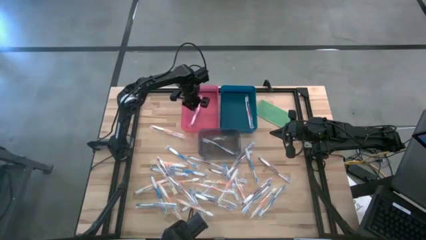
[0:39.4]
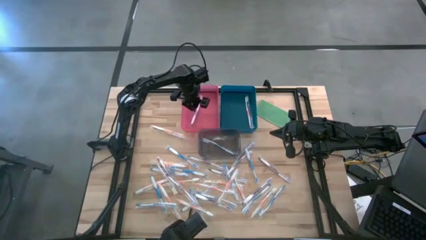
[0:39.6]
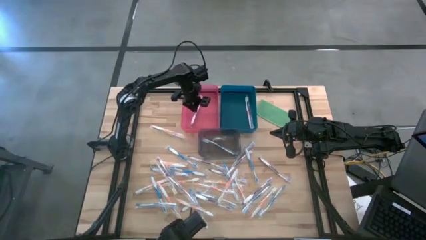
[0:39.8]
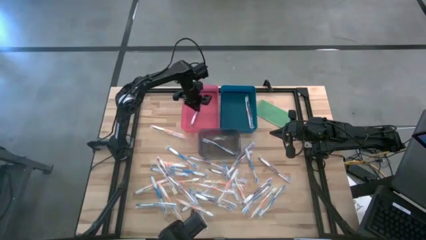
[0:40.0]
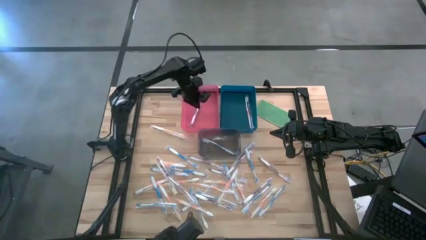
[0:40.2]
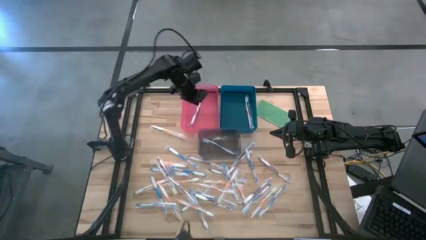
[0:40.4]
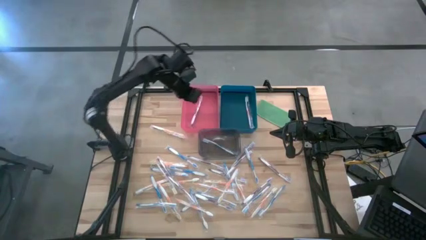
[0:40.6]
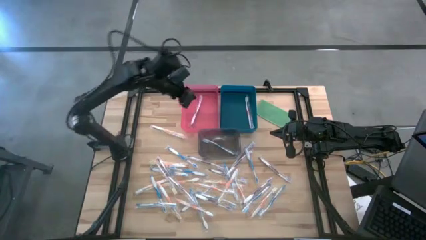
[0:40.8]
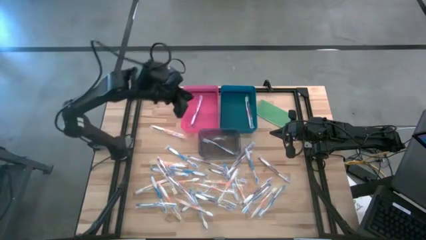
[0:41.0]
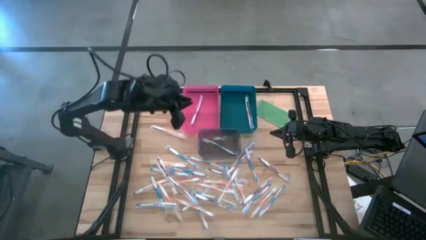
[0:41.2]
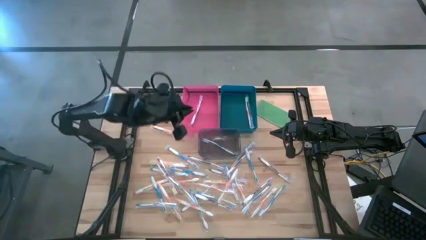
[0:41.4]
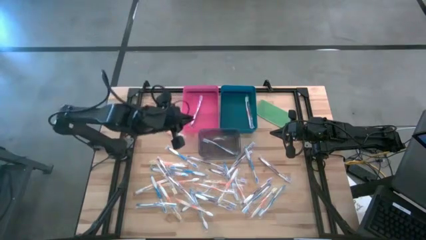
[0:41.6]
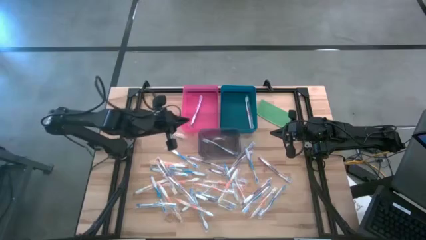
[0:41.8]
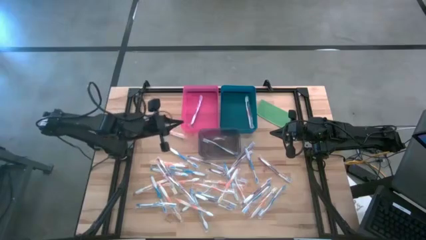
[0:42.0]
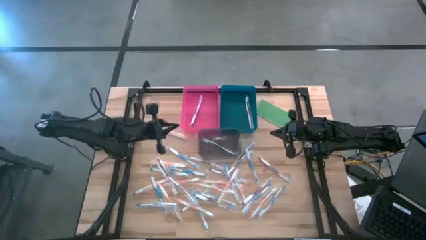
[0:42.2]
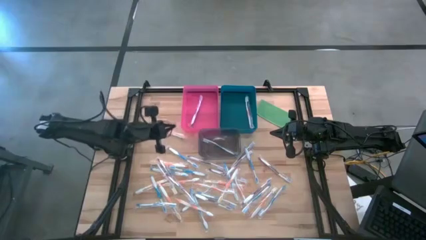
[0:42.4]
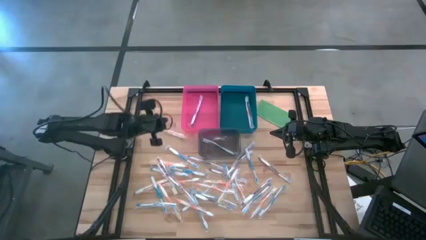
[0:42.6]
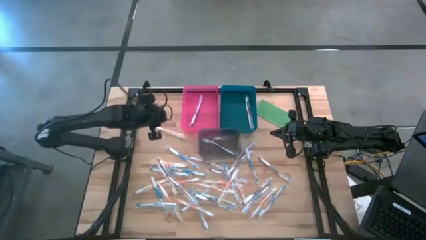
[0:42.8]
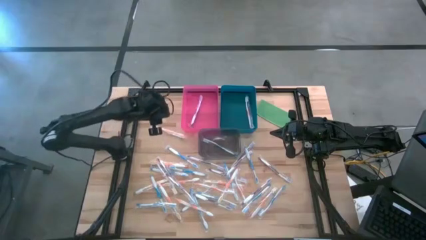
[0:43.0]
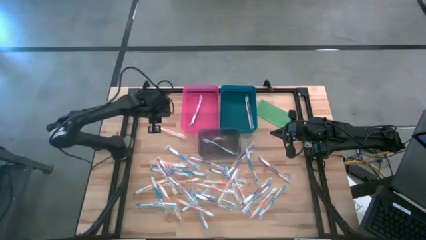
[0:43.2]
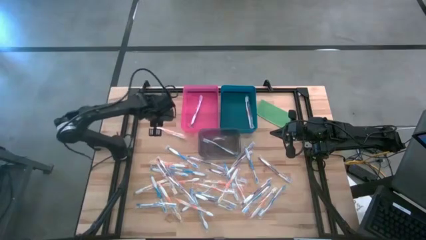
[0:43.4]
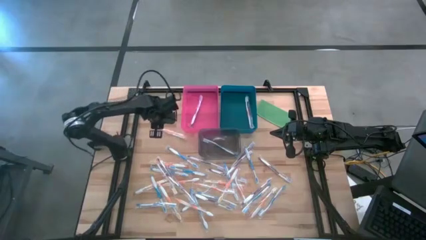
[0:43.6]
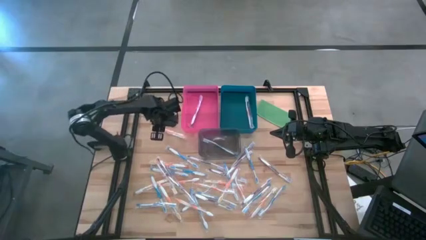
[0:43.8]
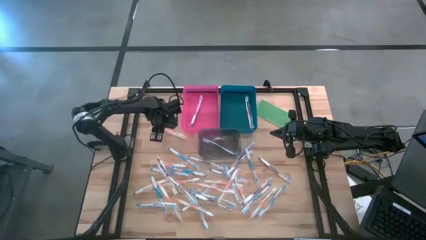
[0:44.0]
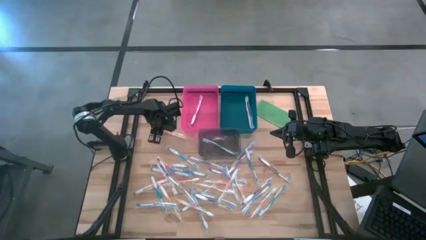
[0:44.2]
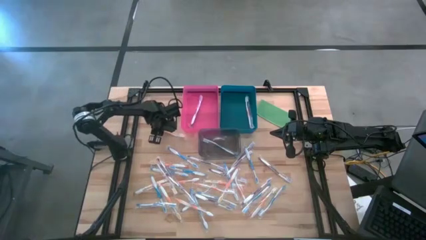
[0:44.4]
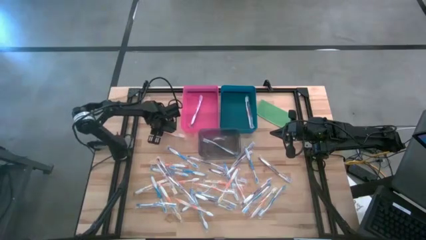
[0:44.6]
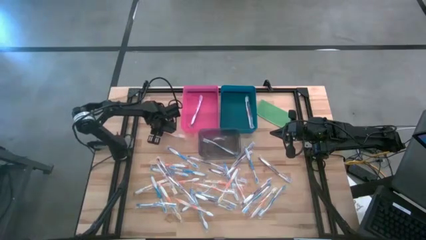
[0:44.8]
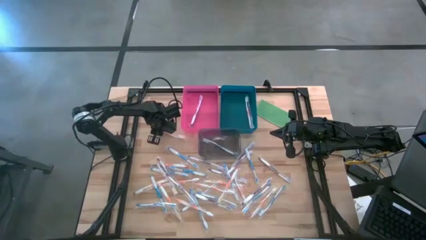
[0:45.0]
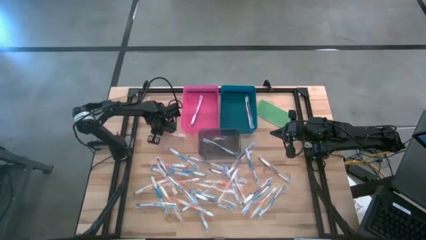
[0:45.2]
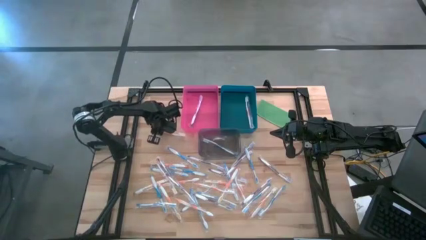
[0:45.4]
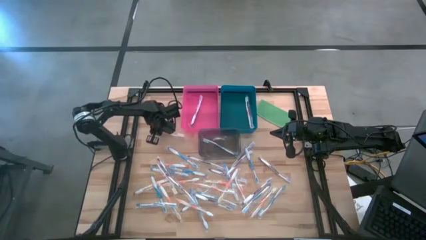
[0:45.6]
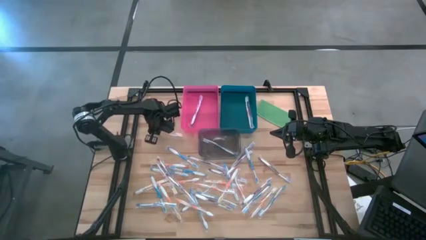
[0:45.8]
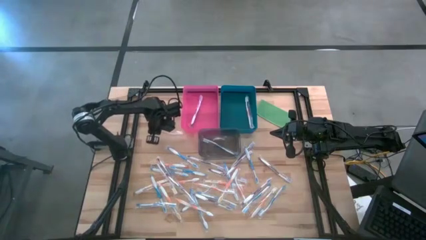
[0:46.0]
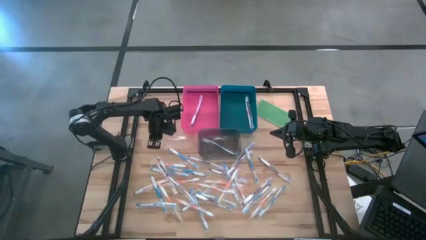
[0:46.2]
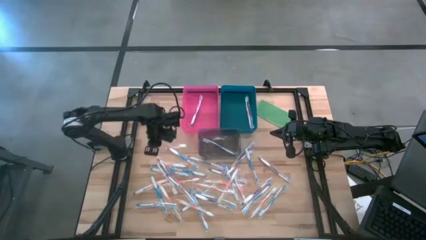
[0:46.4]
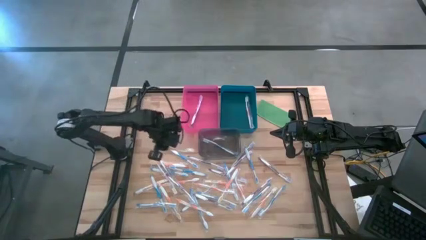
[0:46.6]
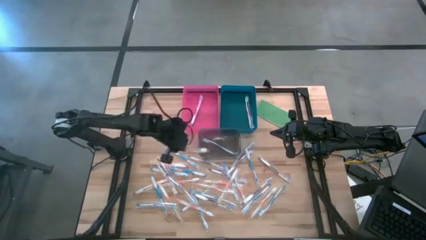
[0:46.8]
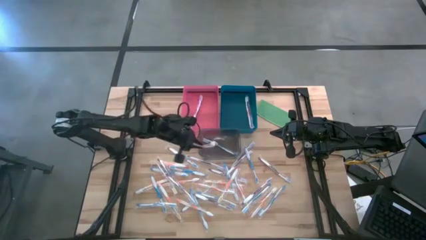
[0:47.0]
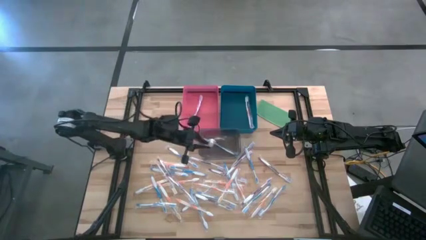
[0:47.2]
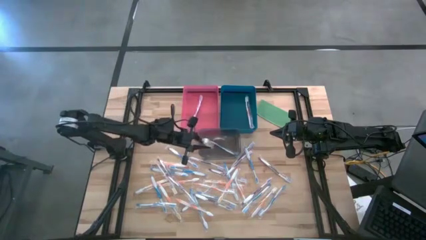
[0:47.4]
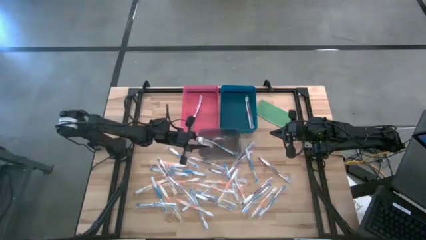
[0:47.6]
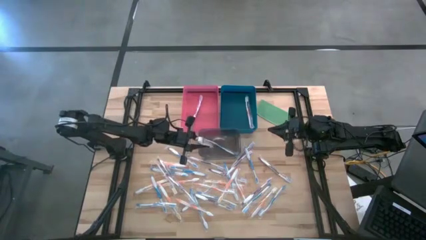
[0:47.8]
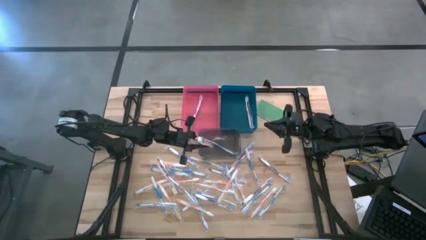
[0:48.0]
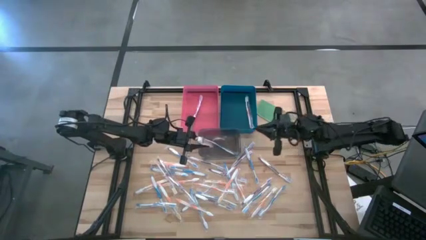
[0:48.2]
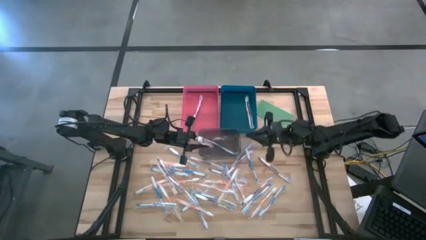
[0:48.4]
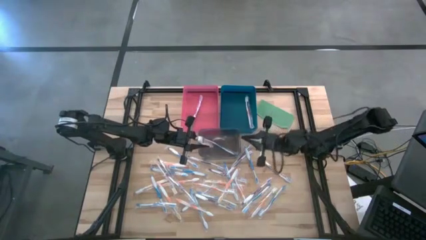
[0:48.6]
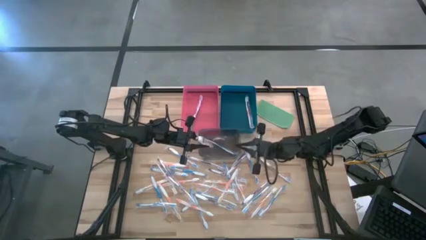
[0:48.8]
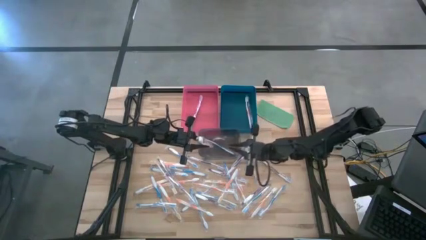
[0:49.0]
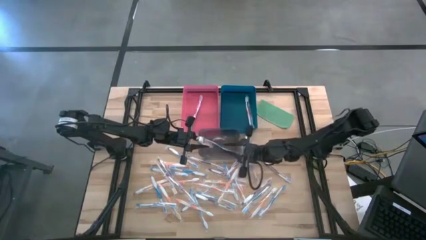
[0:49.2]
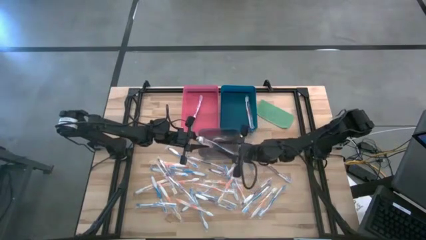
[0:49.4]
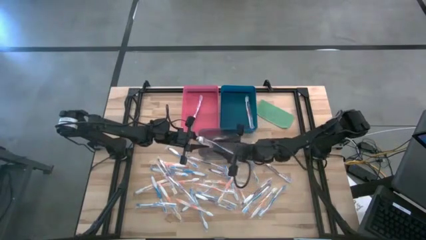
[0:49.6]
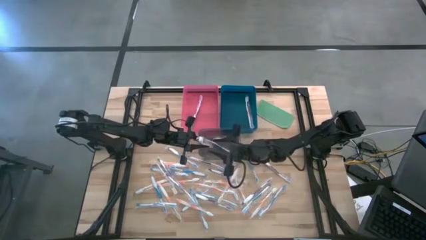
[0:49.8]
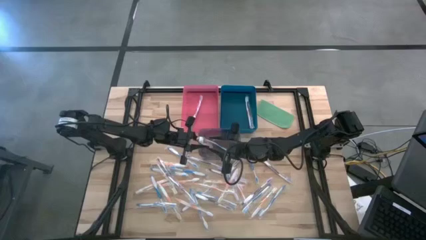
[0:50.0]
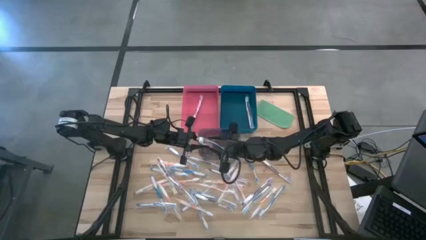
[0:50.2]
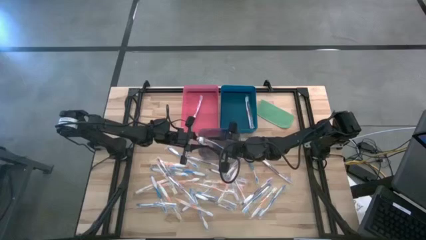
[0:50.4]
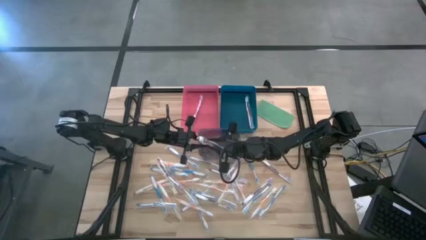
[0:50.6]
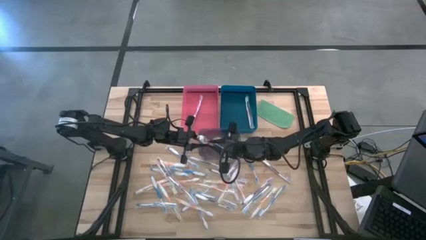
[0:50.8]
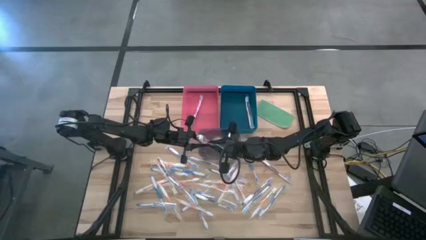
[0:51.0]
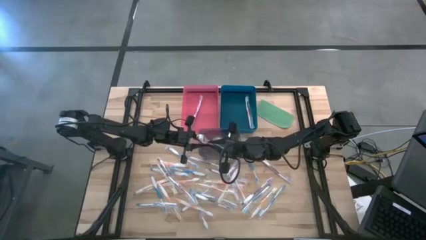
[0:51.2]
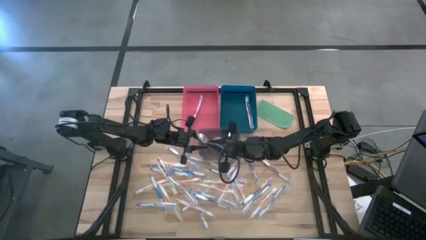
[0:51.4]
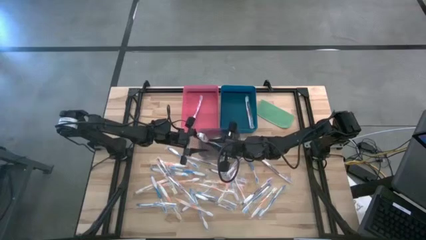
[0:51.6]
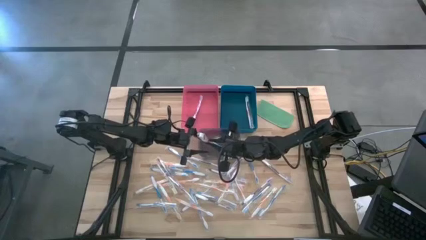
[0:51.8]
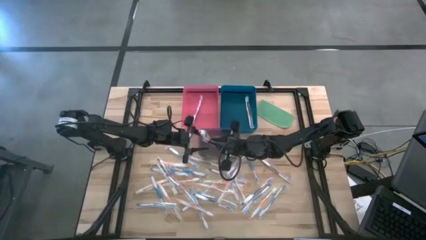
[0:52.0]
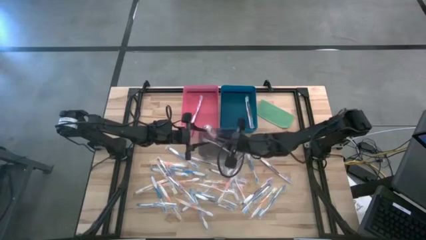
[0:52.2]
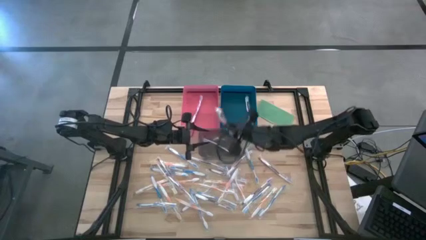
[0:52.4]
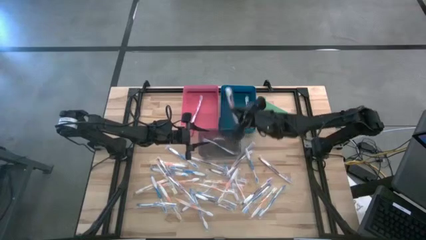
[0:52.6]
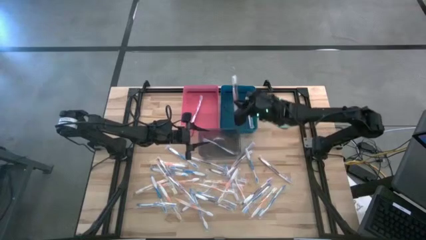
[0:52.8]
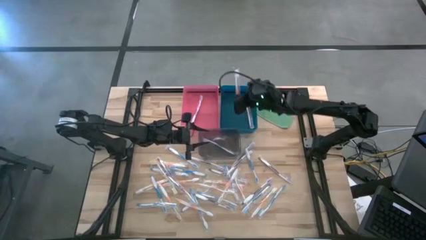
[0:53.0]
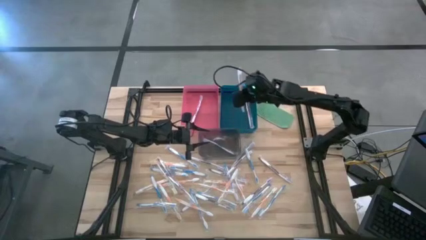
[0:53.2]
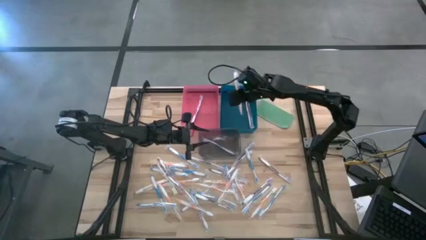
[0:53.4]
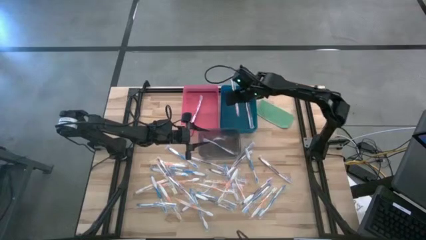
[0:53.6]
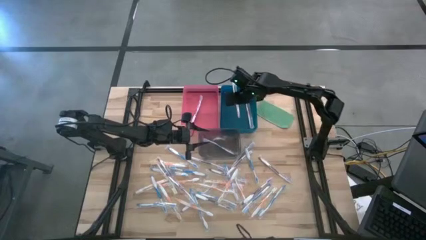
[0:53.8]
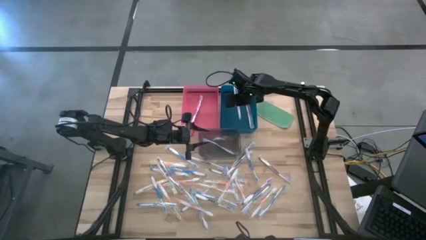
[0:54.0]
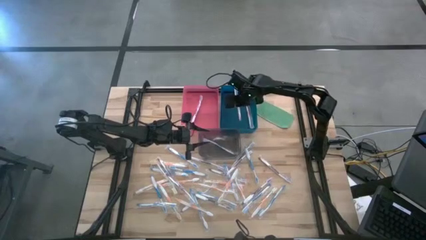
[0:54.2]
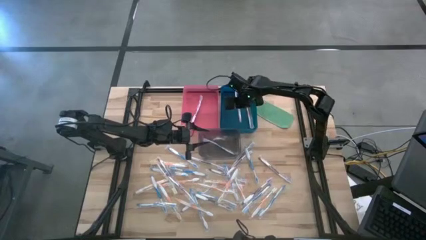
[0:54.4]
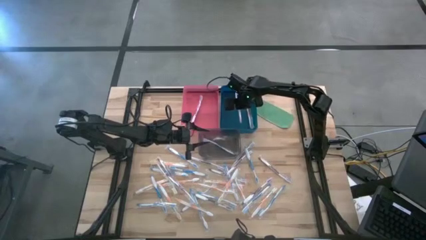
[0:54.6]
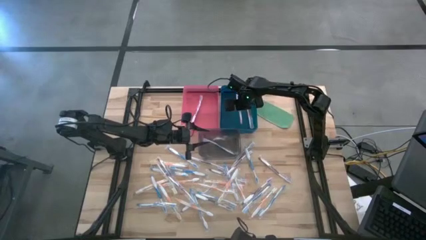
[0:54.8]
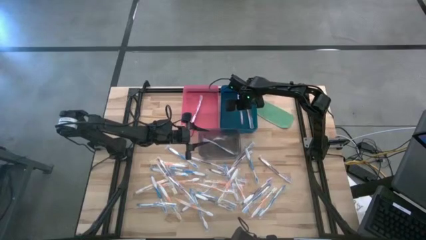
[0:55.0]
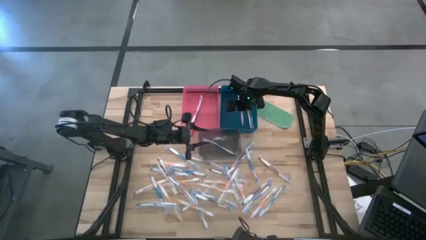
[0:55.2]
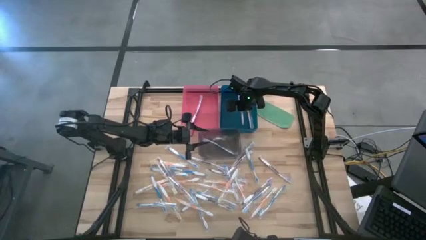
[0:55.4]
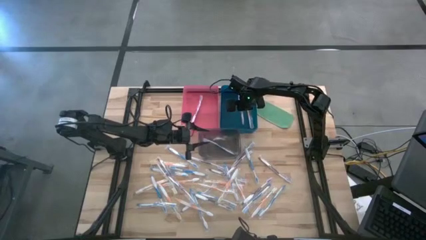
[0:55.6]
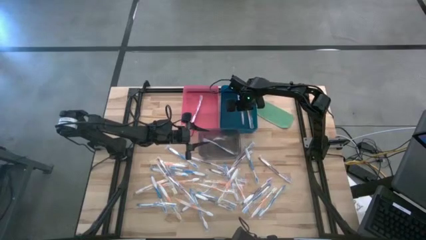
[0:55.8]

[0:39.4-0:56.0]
Task: Pick & Place Toothbrushes
Put the orange toothbrush into the blue bin
